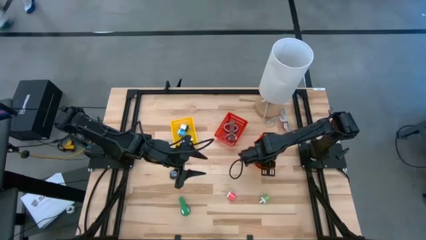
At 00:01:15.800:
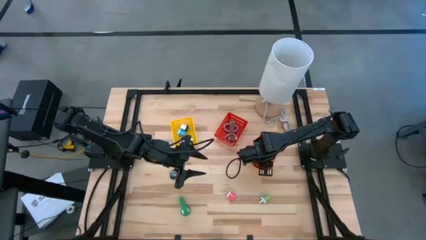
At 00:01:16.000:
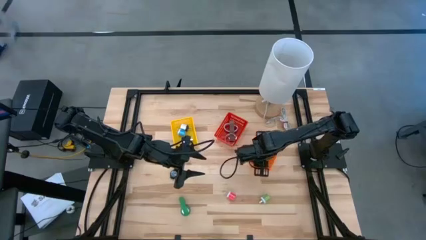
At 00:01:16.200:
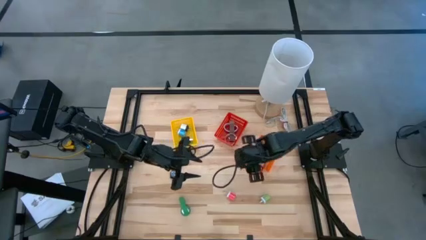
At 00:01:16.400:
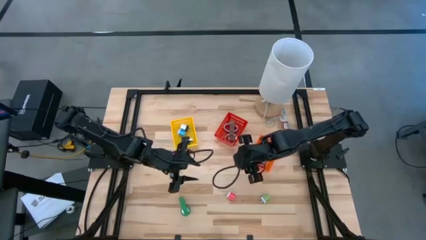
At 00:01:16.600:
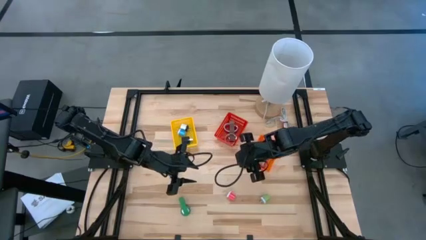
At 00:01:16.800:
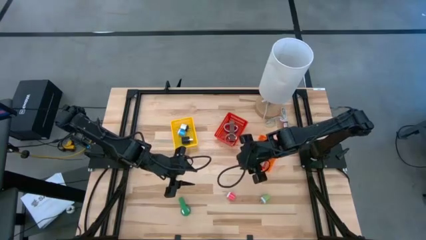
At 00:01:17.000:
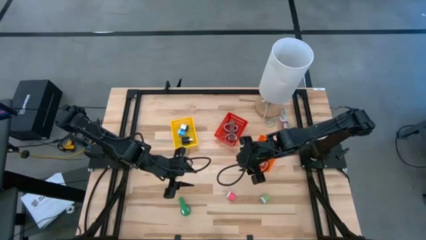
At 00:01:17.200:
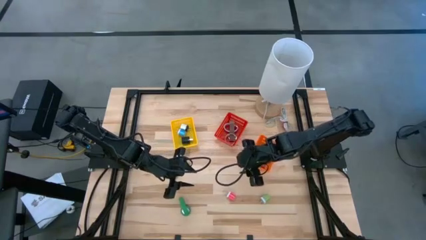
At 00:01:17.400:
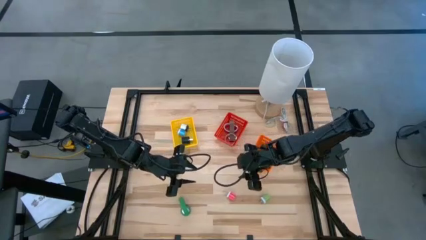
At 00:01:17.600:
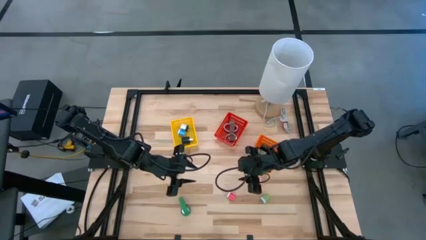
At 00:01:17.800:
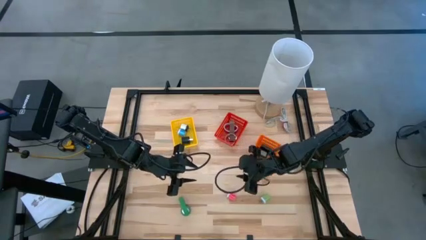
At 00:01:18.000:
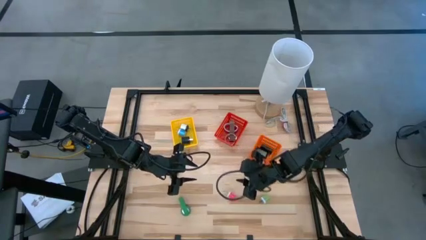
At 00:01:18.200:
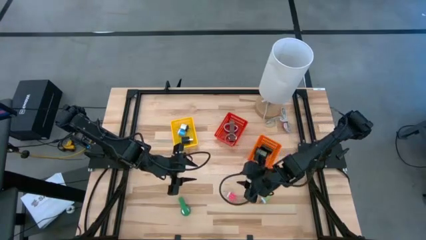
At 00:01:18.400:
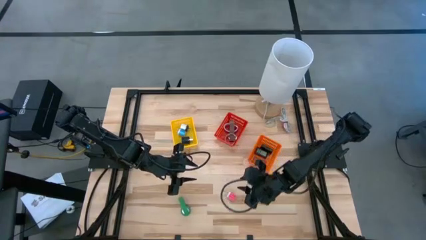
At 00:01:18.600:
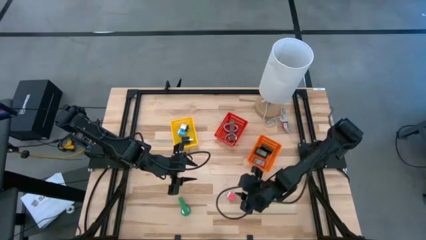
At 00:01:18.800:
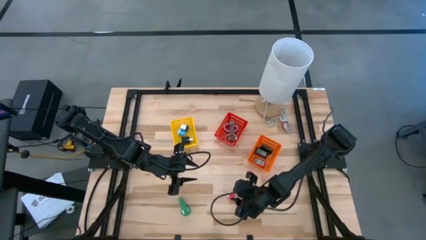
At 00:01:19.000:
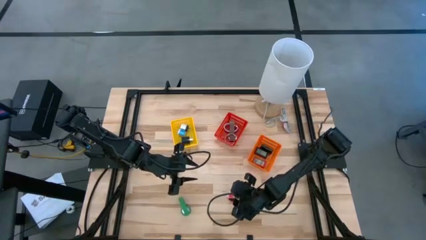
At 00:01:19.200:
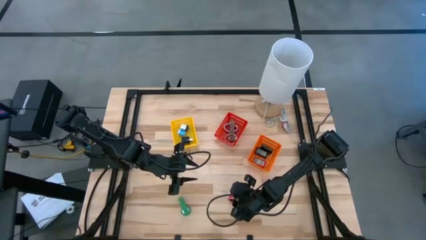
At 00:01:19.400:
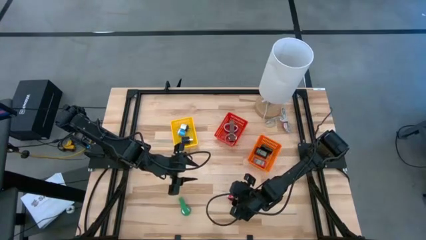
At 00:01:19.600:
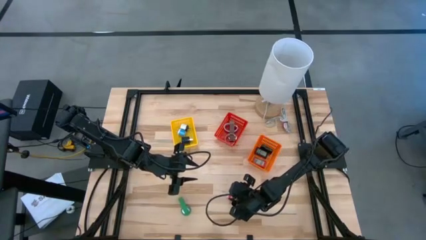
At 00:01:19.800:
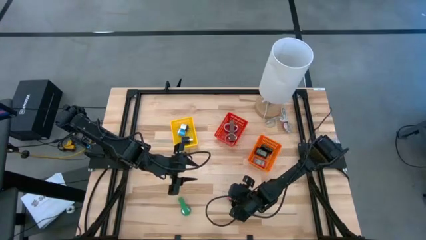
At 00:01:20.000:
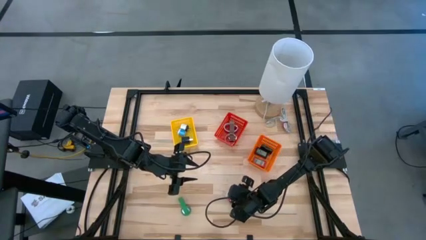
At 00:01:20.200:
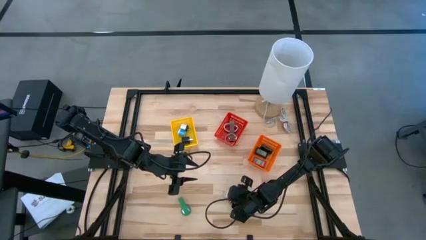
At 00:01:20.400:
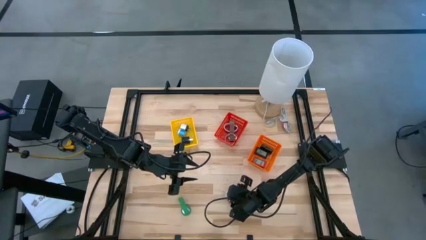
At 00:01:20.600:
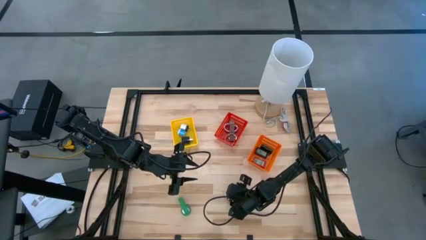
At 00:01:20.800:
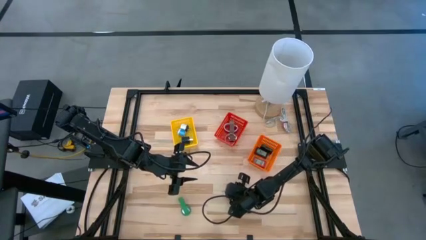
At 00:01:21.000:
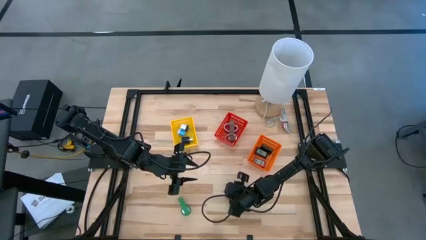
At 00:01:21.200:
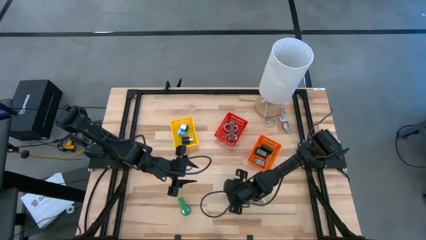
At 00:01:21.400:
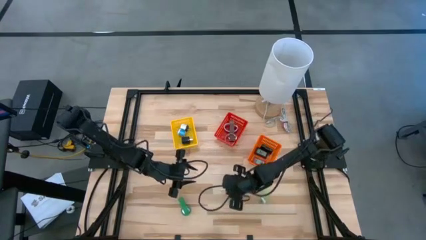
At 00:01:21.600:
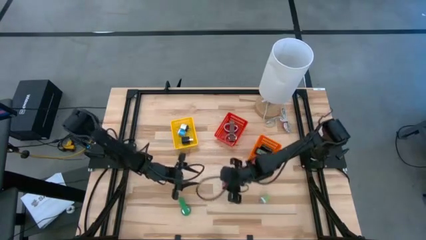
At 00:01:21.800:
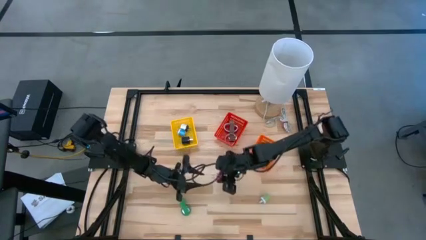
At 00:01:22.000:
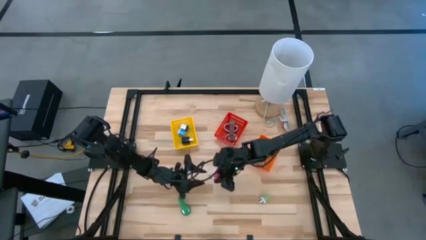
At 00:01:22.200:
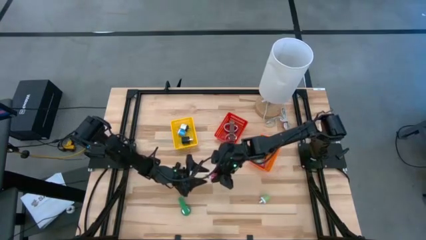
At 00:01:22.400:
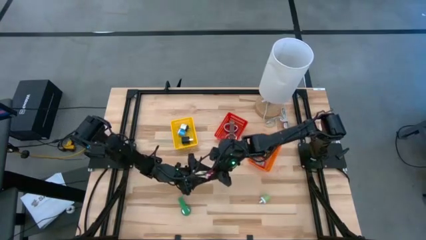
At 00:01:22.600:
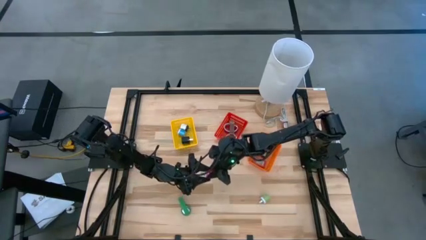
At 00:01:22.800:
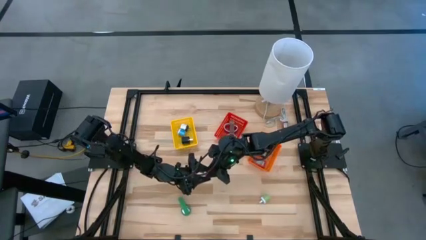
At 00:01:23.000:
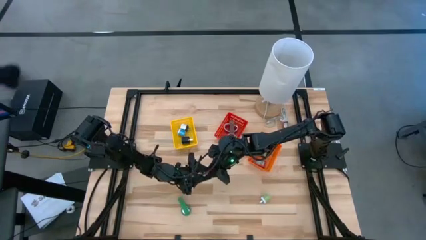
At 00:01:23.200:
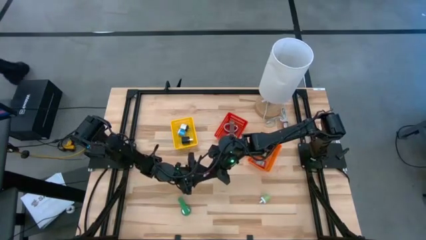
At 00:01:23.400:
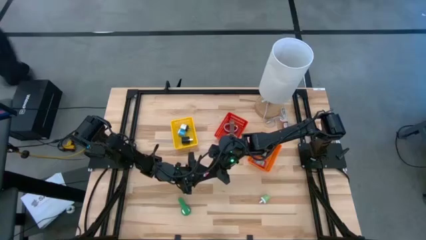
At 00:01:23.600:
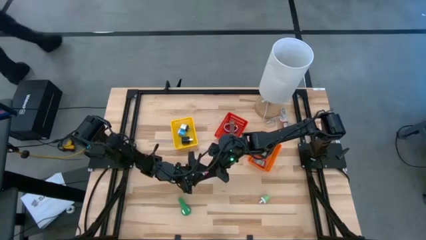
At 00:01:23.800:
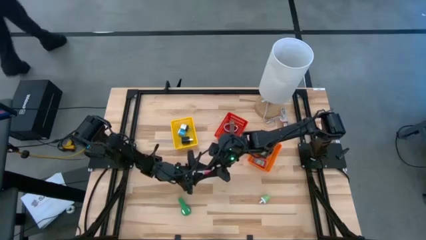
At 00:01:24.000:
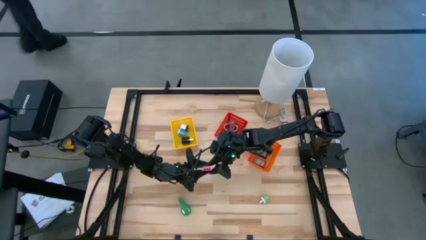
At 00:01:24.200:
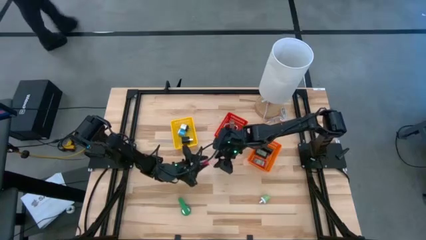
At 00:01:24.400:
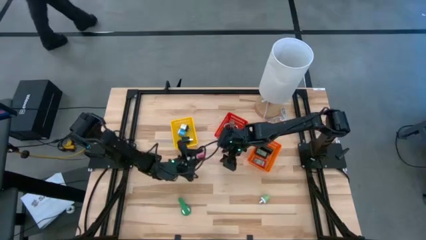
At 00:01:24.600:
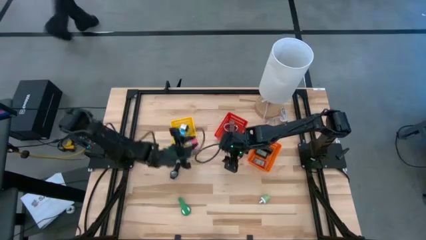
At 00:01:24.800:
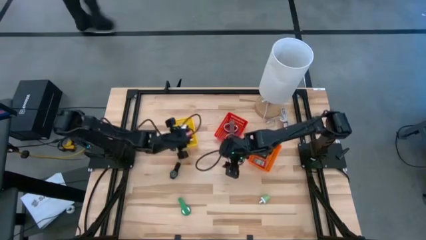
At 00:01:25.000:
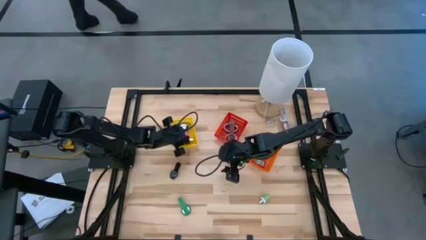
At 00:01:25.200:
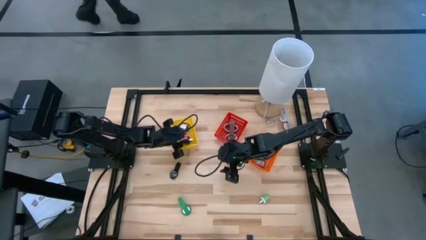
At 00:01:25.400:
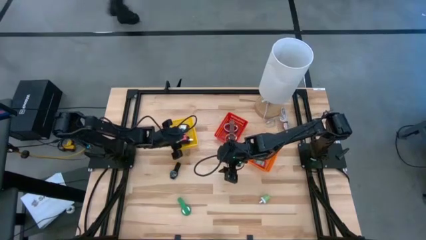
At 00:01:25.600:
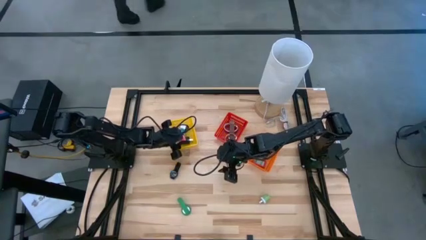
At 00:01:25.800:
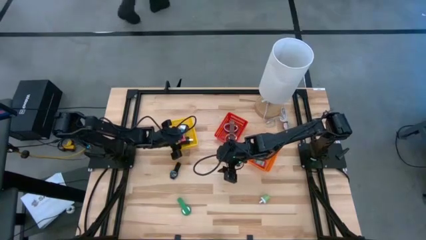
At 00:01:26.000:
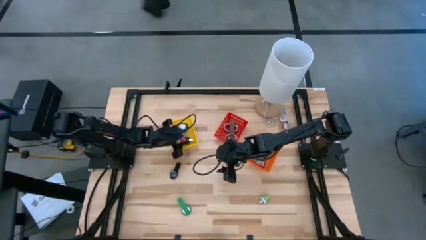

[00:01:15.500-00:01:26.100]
Task: Pick & Place Office items
Put the red adapter into the yellow basket

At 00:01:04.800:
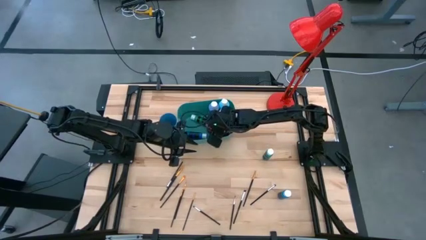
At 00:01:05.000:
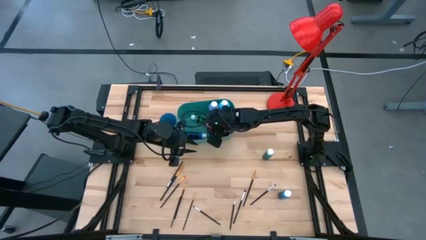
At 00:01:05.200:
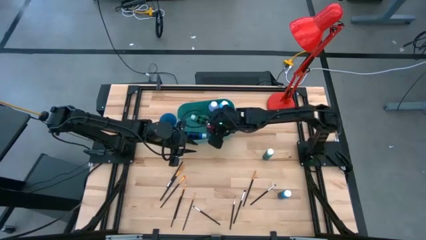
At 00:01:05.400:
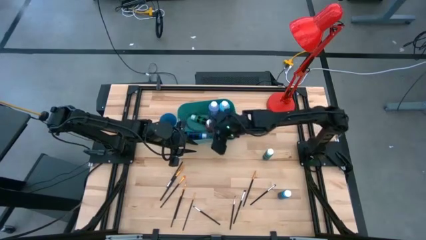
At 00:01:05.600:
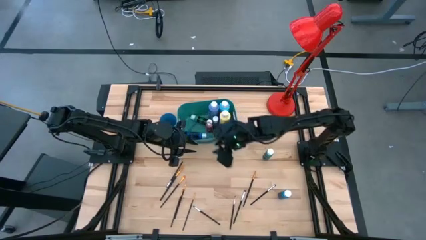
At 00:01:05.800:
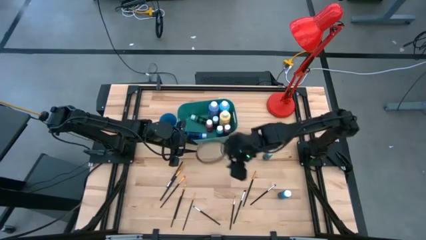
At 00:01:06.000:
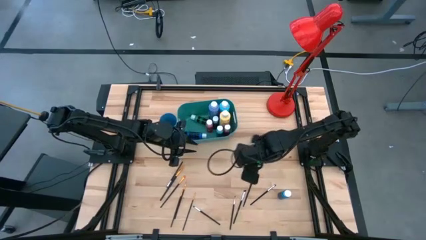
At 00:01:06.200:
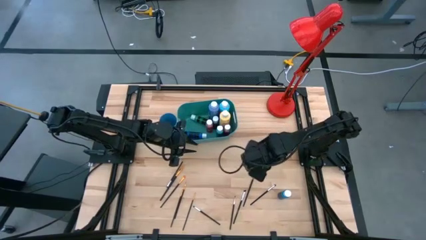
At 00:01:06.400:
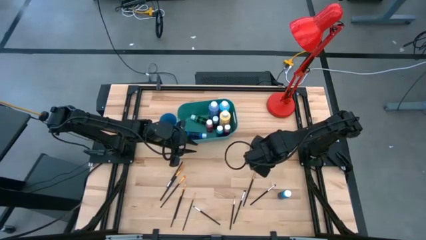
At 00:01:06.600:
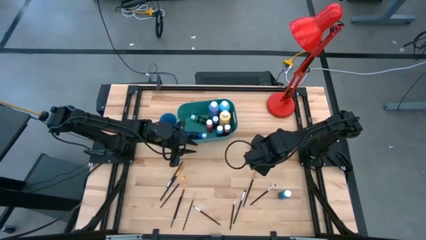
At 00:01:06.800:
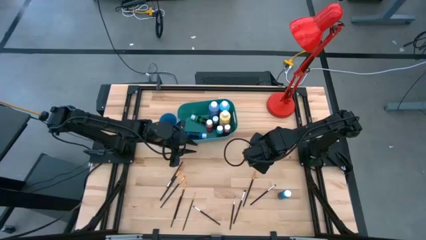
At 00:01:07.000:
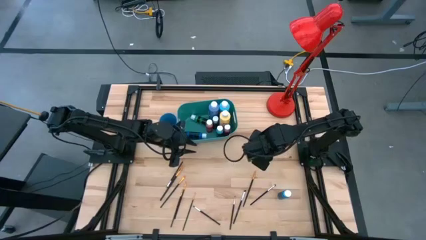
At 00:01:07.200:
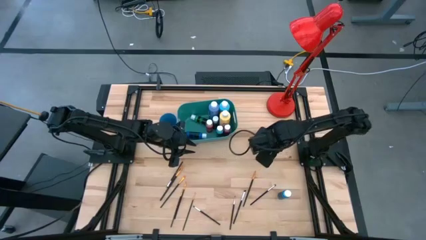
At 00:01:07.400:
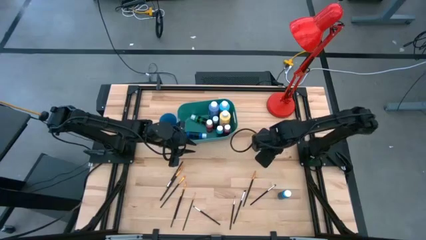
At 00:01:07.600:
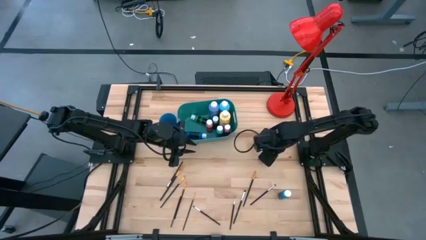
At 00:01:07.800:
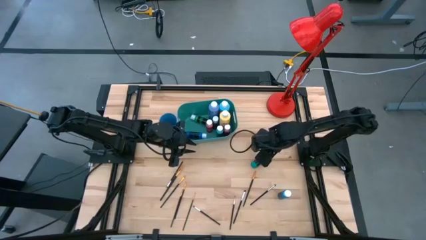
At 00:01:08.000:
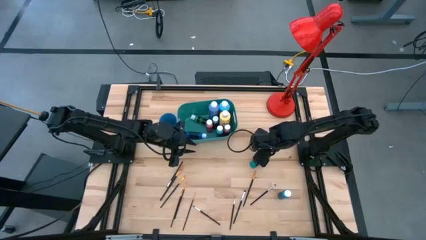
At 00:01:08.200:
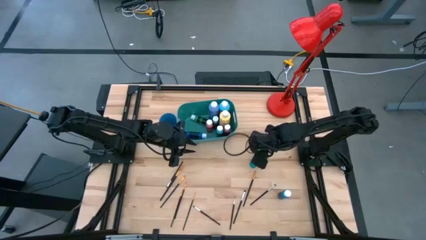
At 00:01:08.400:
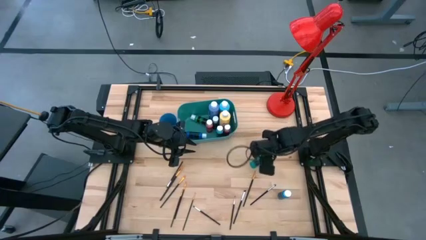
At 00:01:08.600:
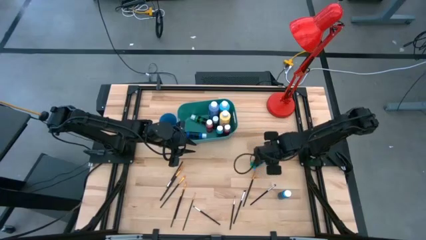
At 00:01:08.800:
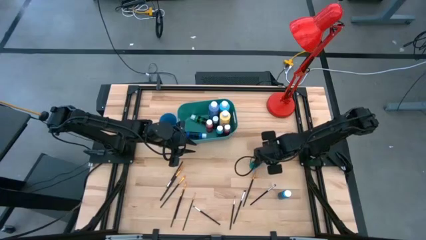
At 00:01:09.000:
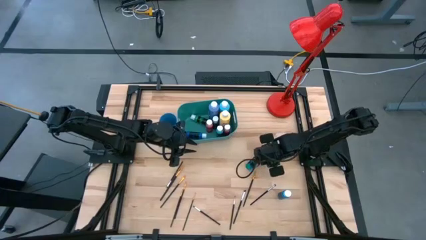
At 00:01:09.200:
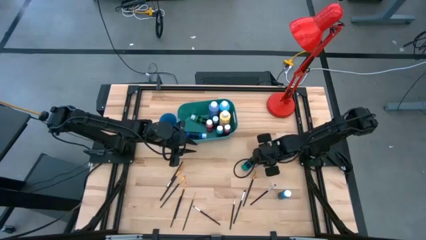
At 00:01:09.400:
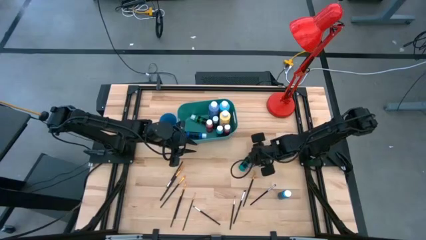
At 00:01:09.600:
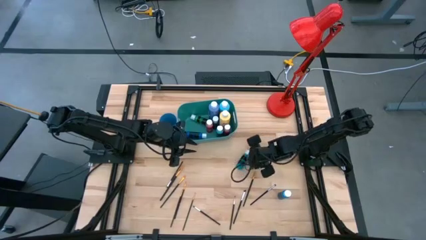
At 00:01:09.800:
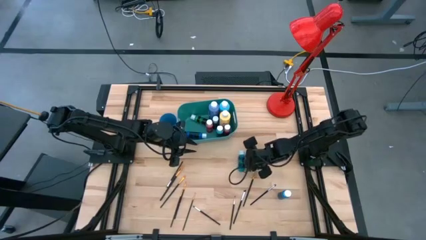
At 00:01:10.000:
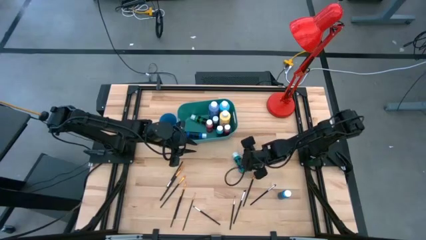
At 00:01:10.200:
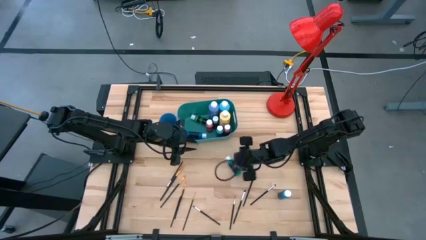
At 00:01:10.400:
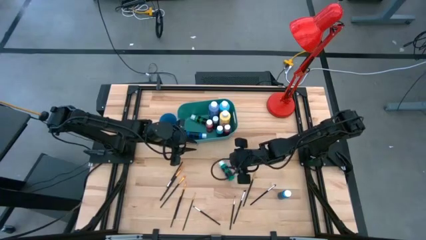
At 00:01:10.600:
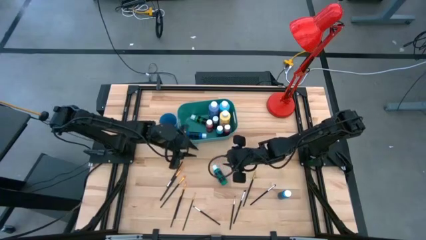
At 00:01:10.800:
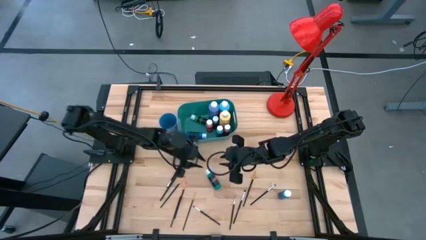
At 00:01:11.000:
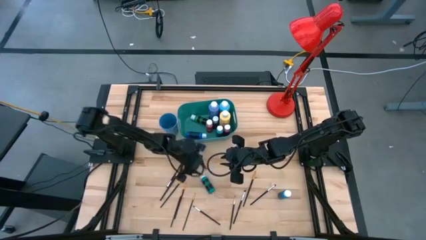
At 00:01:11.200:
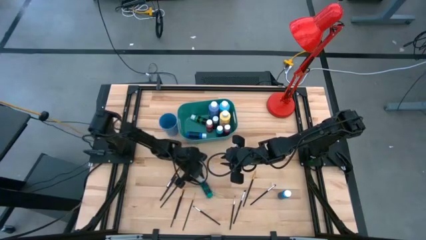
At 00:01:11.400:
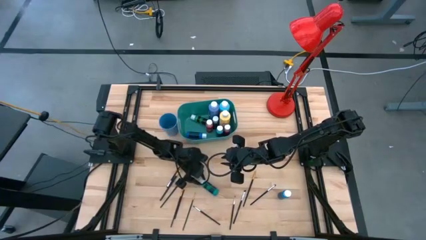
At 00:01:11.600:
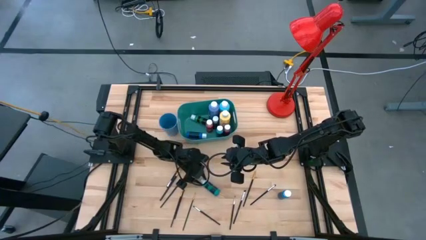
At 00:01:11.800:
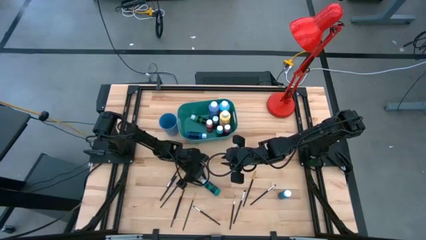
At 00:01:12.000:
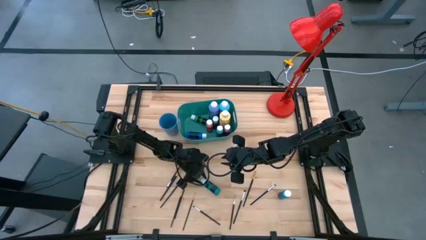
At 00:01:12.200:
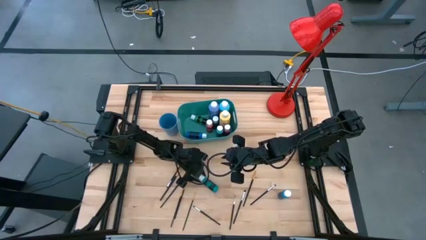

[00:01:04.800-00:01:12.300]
Task: Pick & Place Paint Supplies
Put the small blue green paint bottle into the green bin
